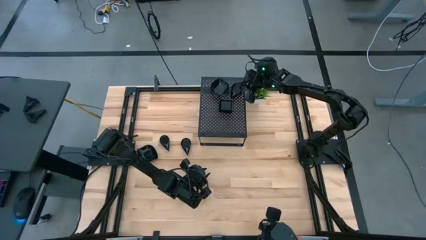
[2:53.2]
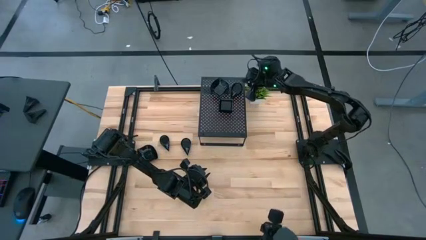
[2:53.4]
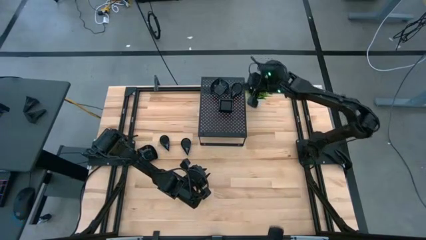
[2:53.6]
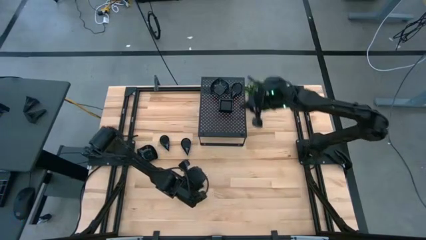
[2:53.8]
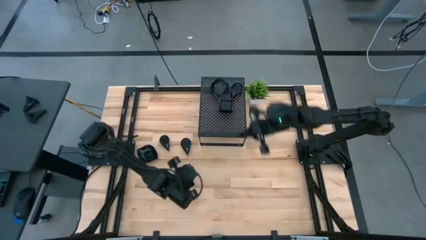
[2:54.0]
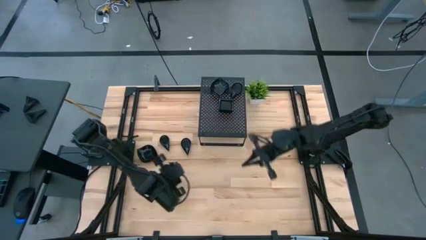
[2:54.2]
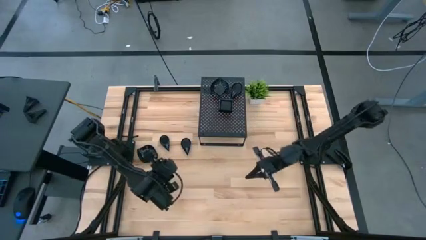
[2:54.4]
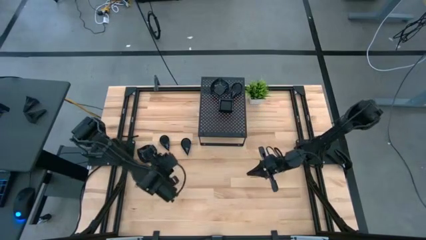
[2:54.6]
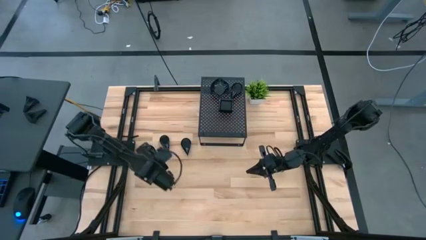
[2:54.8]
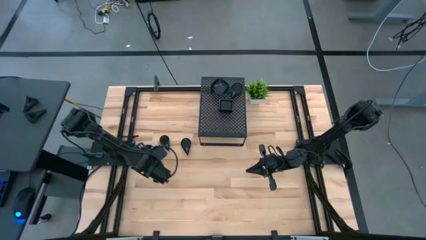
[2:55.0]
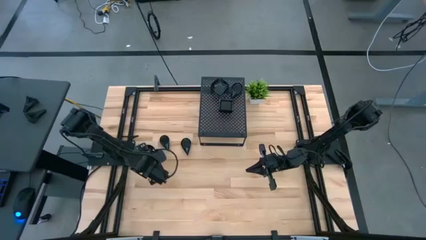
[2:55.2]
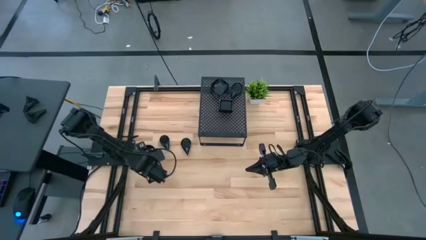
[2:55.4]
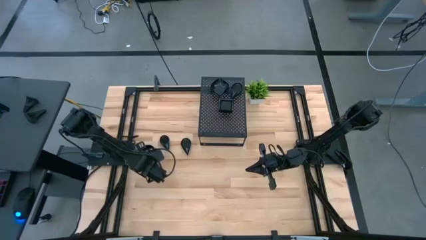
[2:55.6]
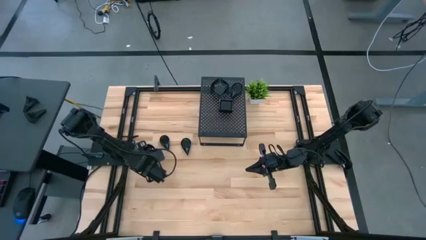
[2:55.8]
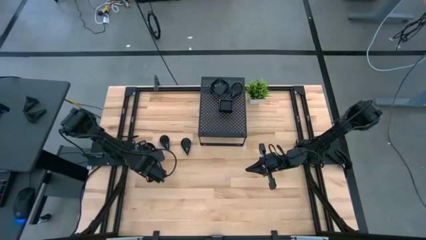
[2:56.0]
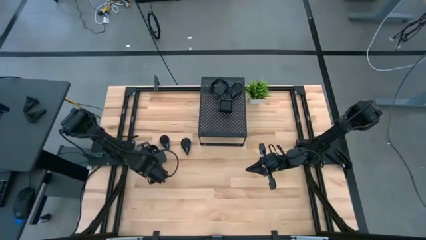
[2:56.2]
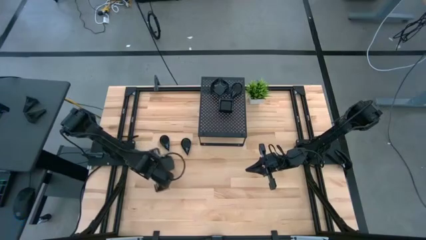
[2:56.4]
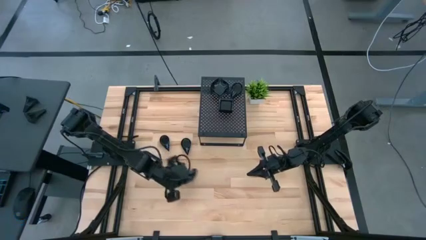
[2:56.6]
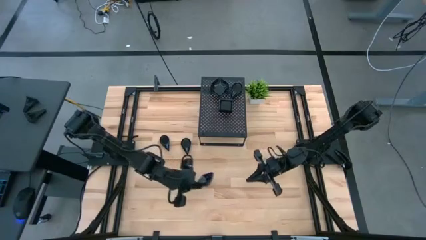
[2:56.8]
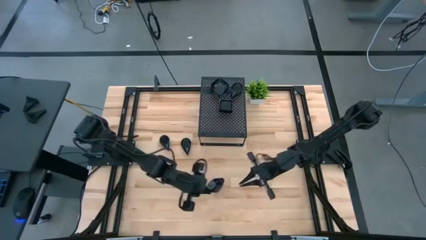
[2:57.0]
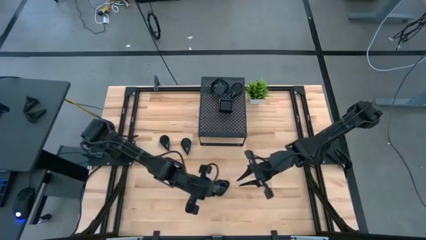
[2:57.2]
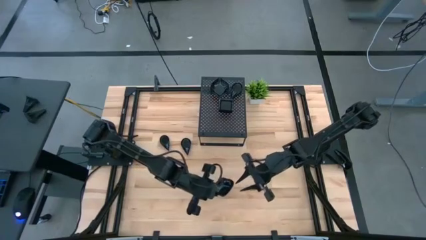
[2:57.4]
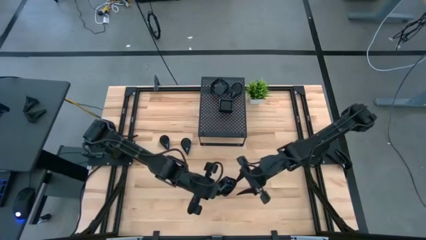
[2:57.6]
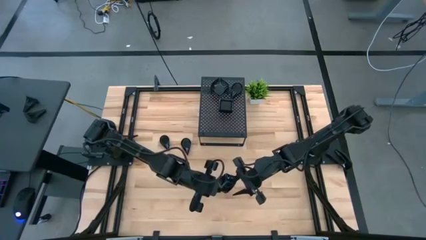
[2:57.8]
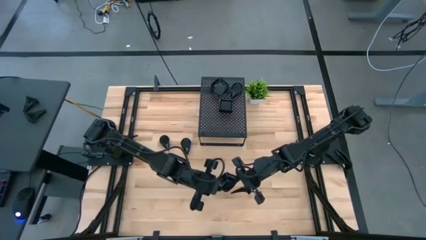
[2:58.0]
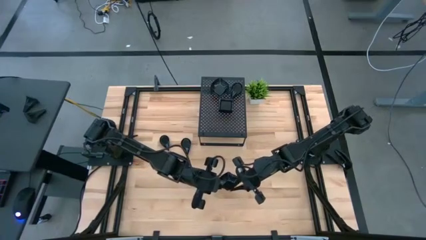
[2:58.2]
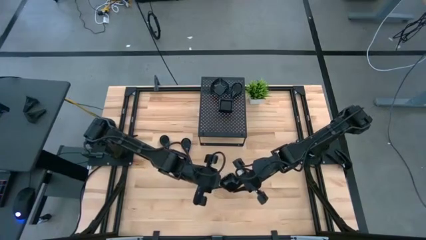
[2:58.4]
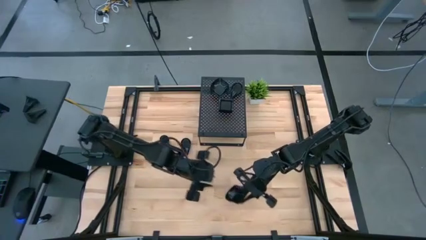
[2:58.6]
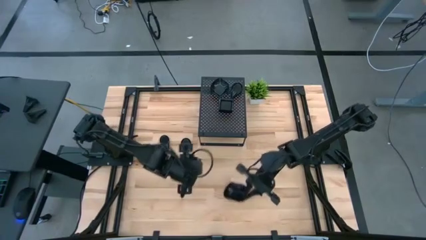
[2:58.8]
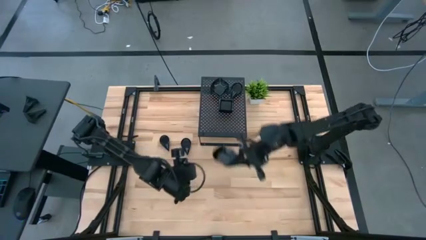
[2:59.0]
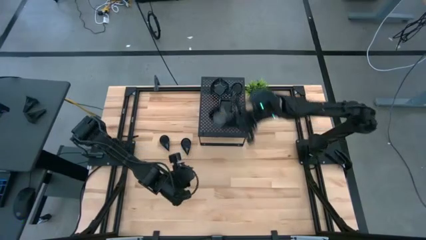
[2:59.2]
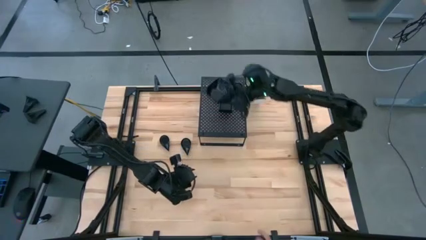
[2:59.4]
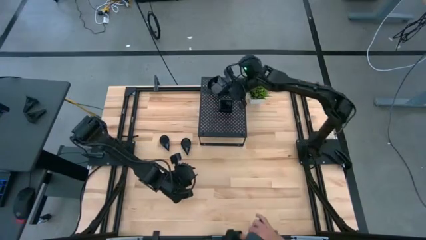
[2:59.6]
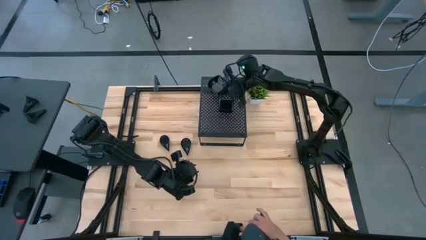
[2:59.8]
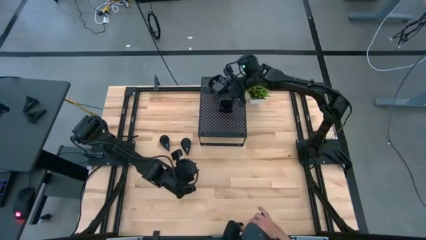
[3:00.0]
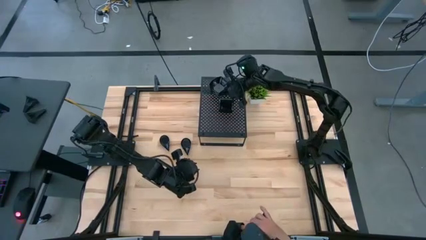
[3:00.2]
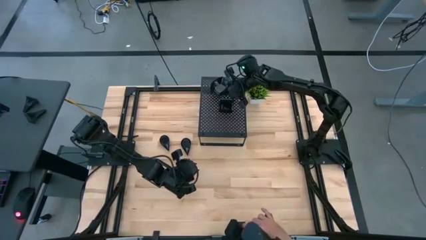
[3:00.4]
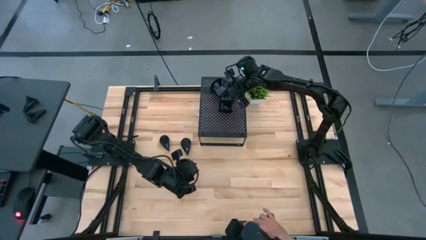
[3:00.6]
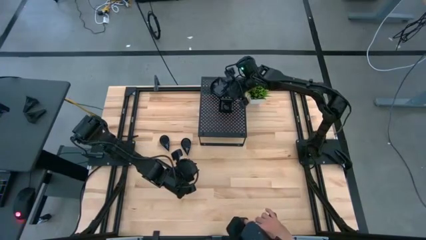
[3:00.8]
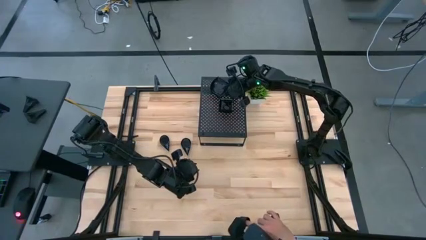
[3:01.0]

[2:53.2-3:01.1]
Task: Pick & Place Mini shaped plates
Stack the black leaf-shaped plate on top of the black leaf-shaped plate on the shelf

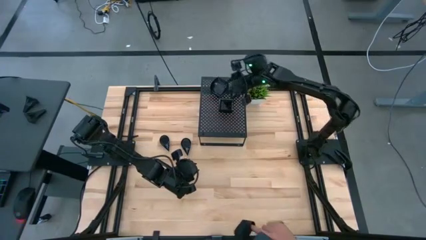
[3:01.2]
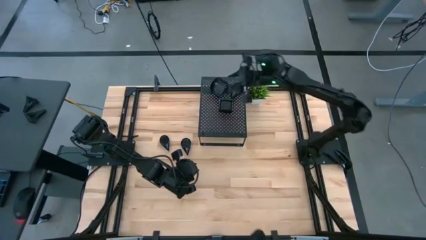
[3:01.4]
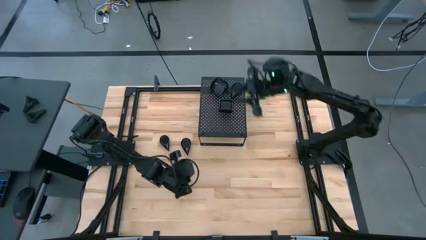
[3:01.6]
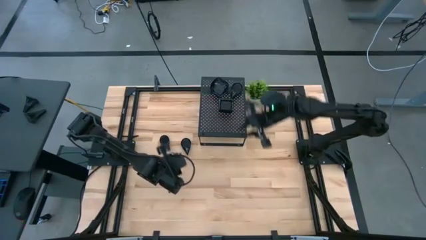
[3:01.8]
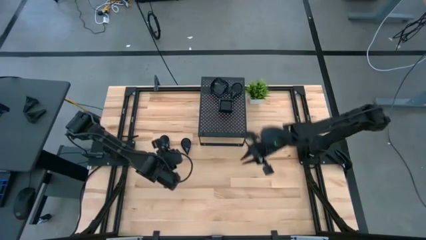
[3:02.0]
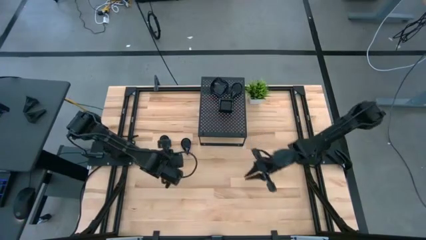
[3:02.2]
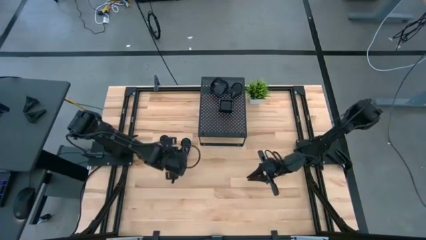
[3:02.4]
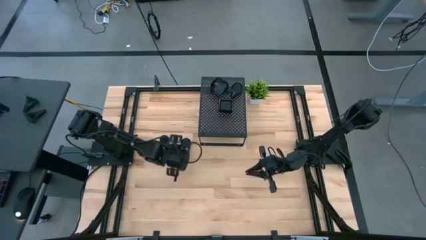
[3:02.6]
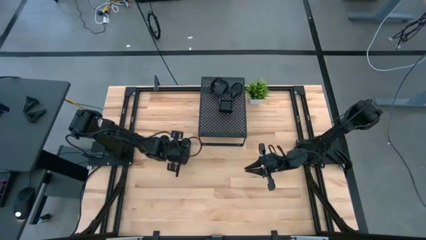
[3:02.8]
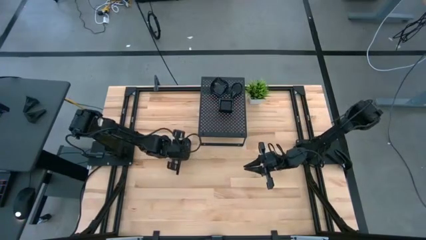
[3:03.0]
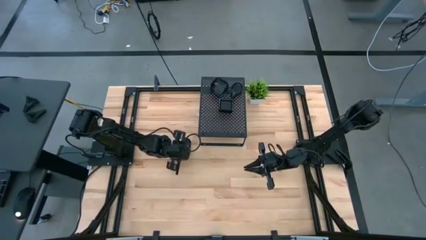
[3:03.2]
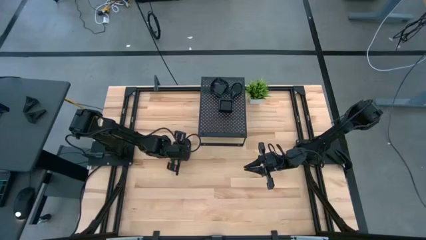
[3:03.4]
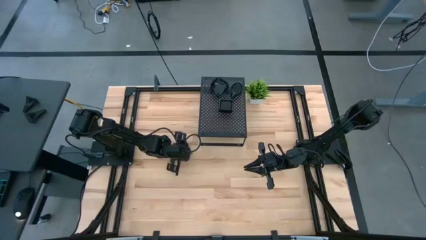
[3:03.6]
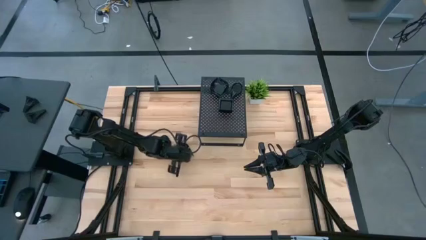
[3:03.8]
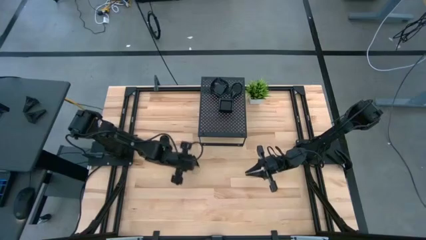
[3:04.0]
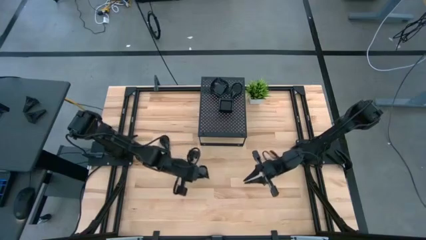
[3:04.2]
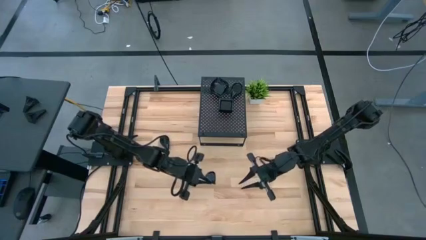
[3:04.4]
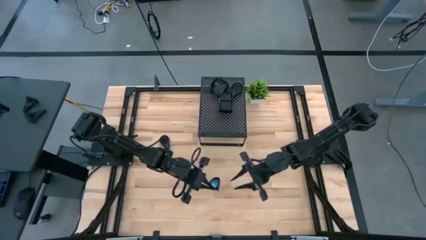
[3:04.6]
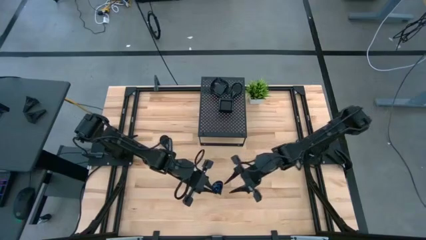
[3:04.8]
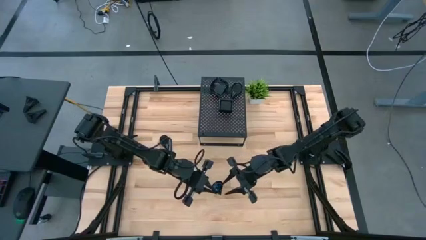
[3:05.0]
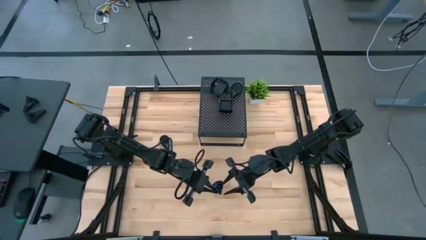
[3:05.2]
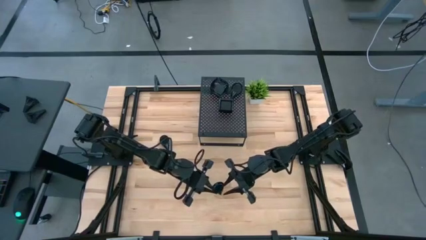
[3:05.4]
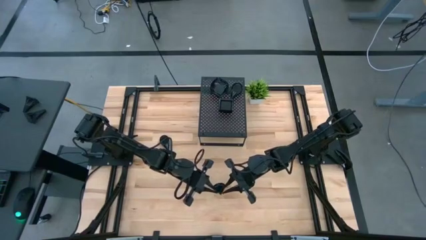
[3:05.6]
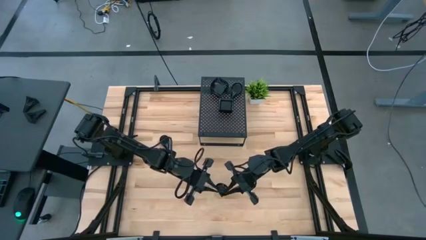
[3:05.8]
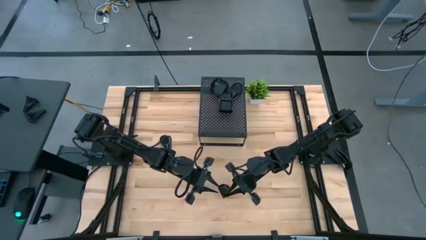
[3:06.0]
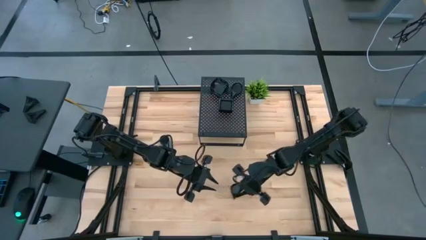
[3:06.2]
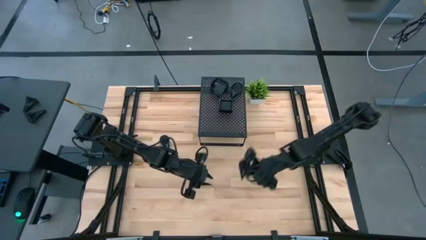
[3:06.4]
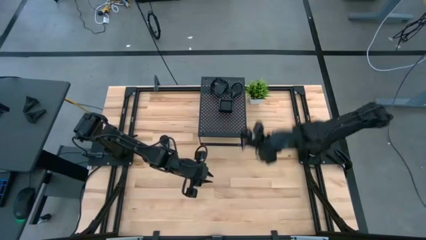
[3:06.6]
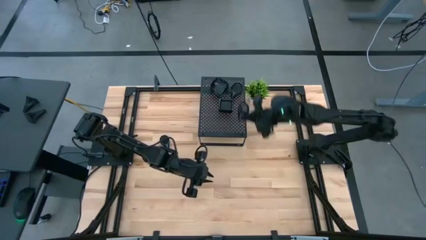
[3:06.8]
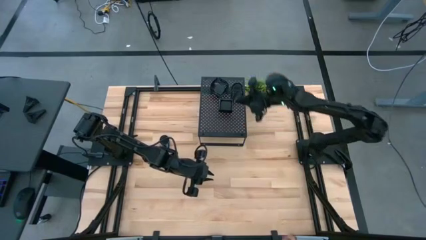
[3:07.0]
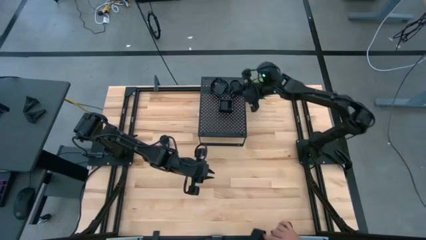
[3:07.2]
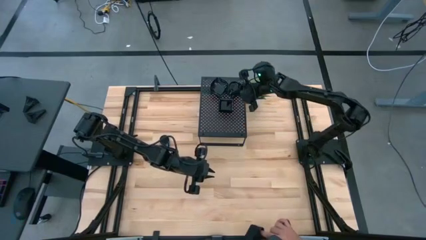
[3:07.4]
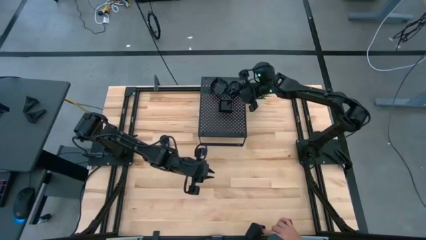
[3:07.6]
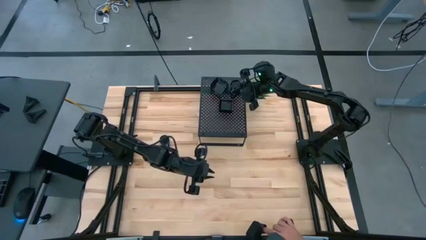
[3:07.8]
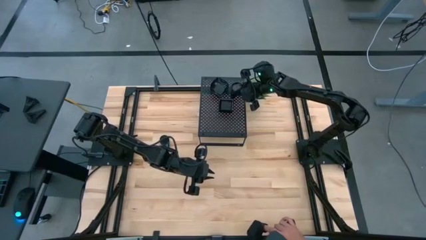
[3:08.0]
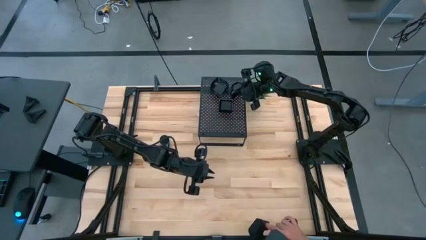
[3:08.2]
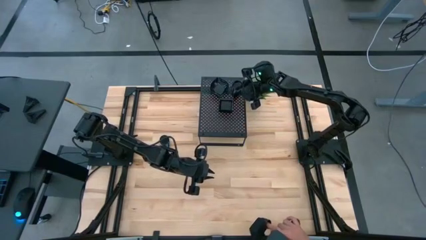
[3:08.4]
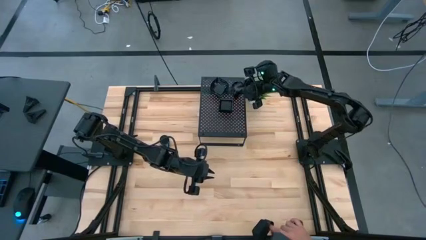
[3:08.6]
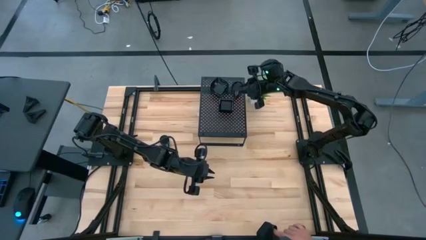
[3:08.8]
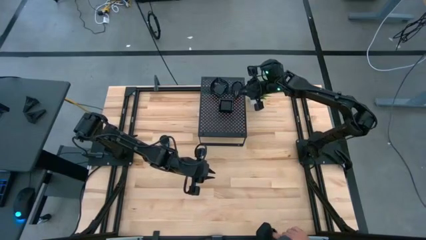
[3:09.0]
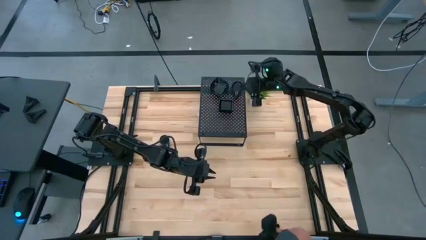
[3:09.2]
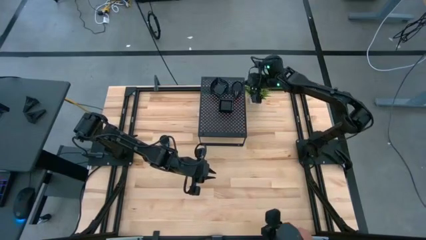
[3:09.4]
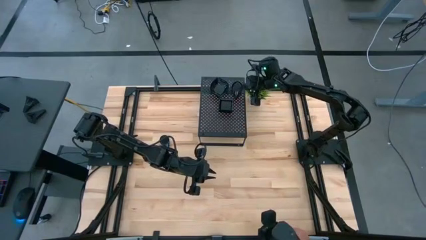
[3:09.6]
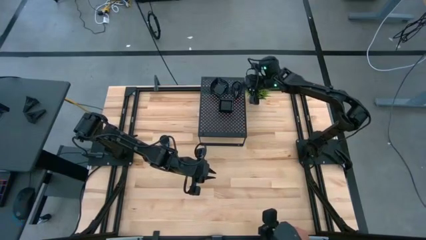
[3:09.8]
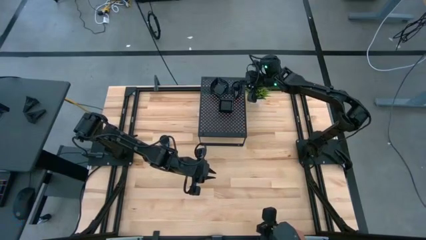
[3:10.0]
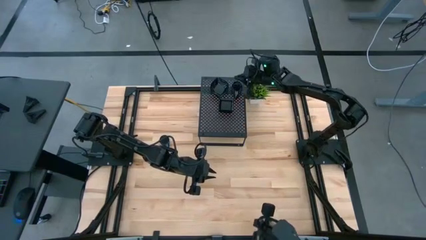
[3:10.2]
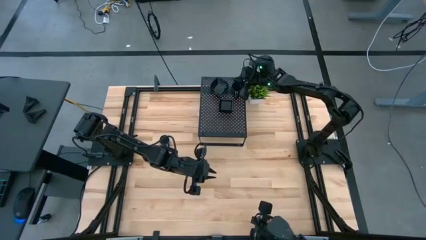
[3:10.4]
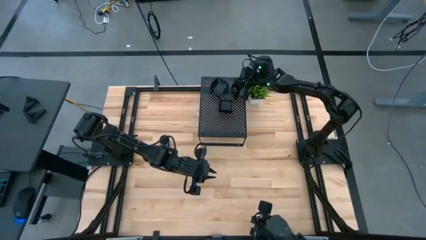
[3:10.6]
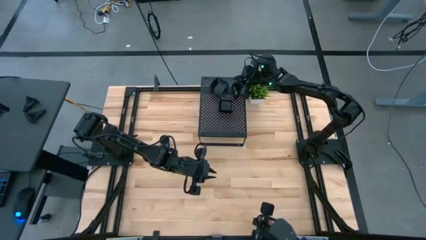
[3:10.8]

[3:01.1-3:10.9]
Stack the black drop-shaped plate on top of the black drop-shaped plate on the shelf
